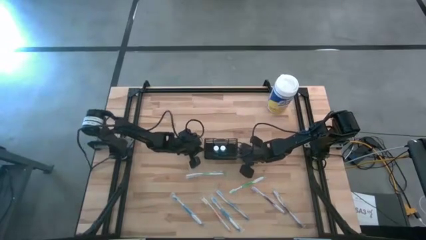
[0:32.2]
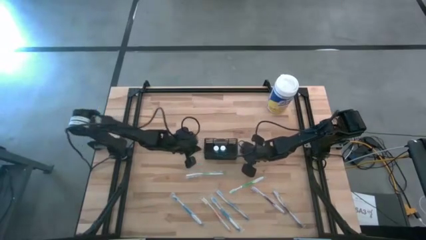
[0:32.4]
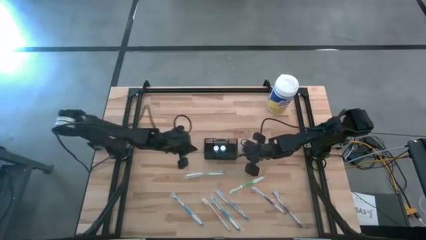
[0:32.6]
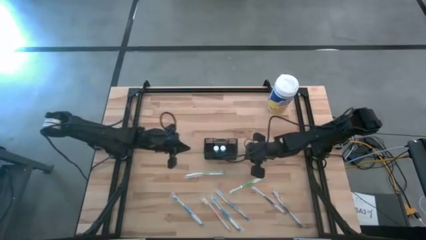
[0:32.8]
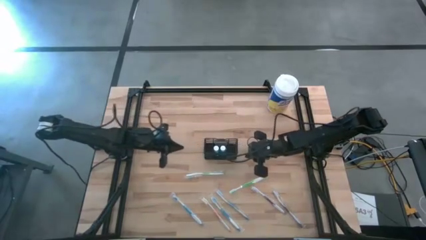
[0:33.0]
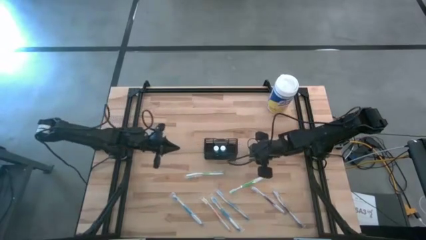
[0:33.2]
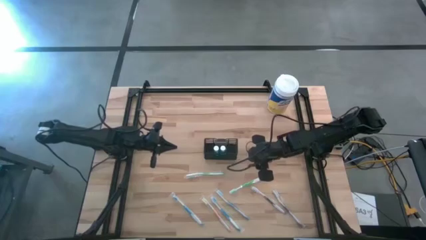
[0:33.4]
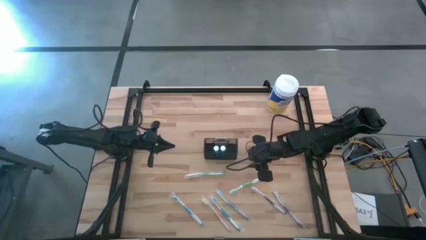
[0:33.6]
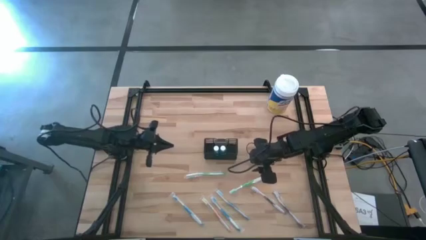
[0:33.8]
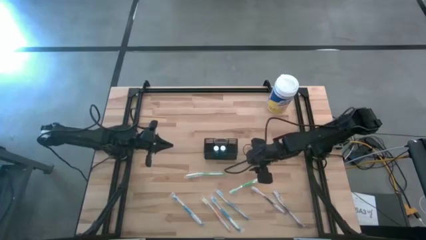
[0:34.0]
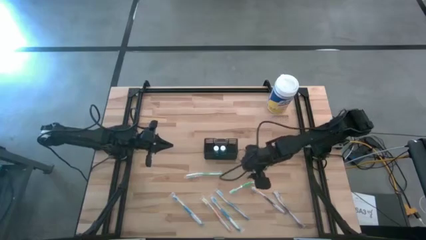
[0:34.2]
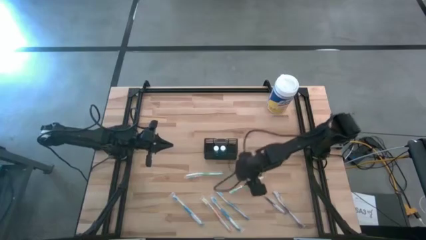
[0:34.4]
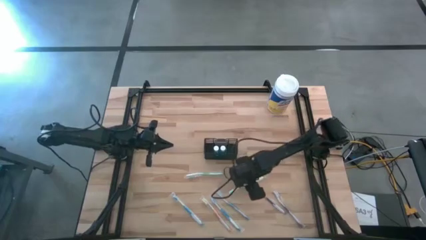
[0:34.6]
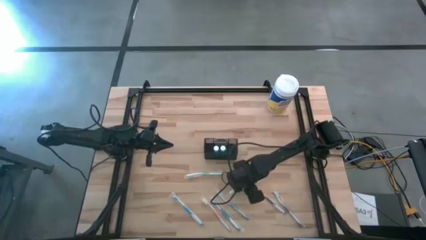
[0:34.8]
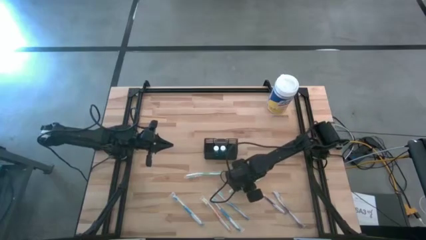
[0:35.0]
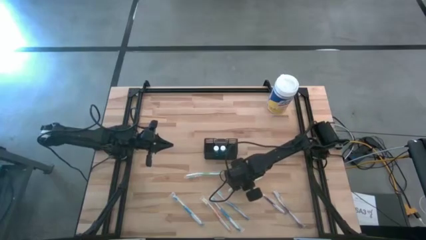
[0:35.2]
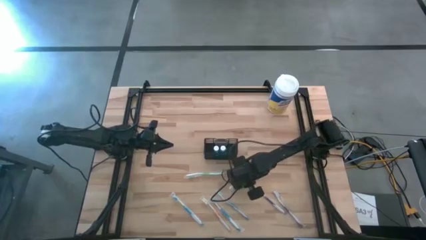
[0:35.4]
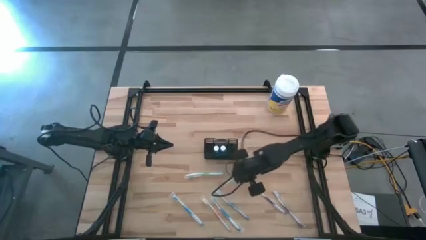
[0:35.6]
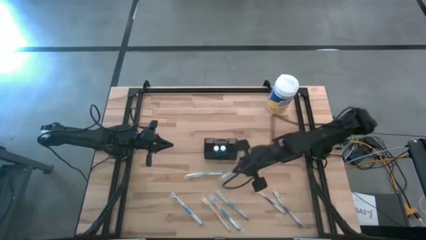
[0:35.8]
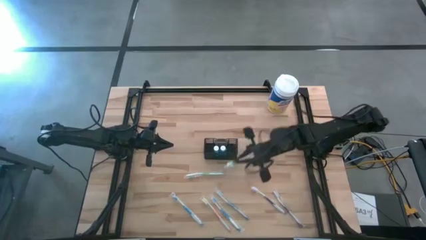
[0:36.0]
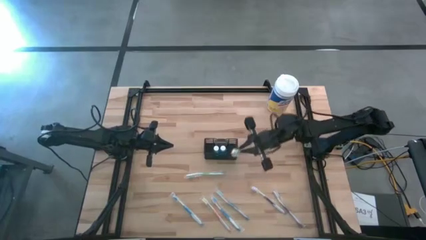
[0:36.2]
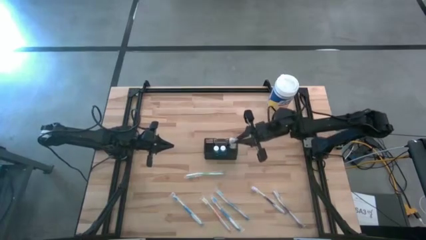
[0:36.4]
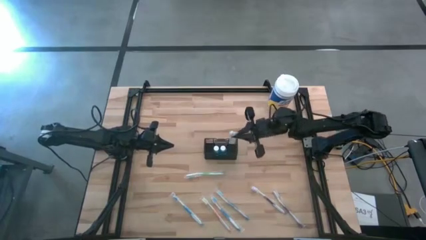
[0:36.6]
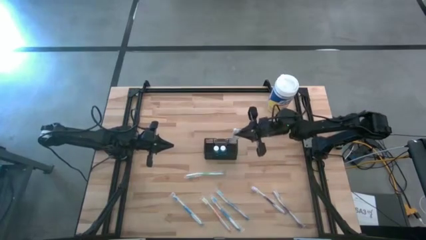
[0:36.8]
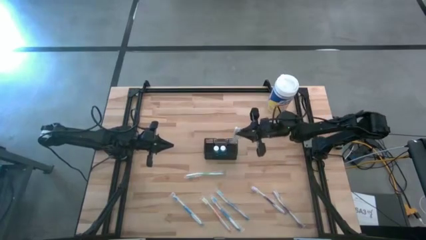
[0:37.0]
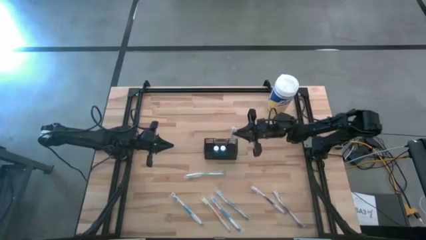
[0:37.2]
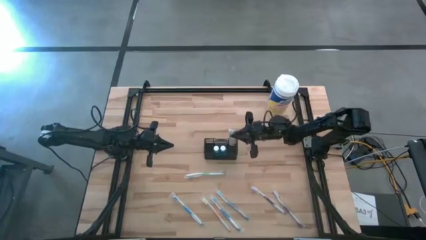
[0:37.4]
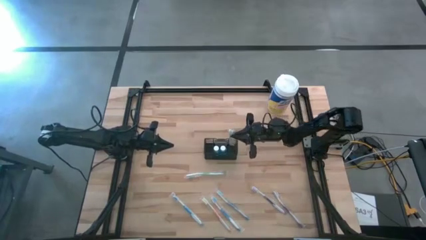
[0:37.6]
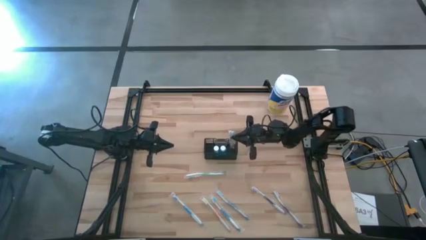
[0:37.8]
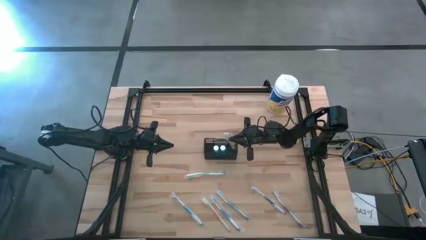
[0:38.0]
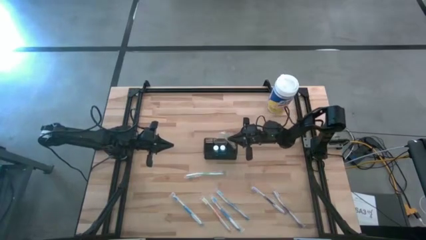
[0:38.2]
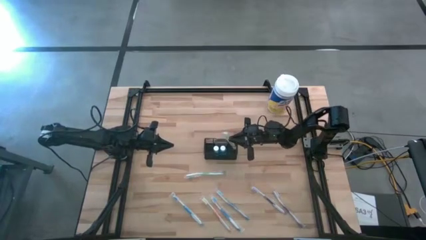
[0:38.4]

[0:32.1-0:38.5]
Task: Pick & Place toothbrushing station
Put the green toothbrush into the black organizer

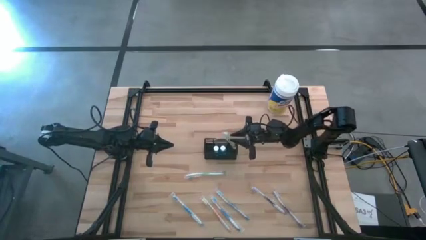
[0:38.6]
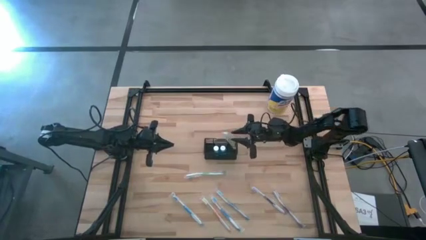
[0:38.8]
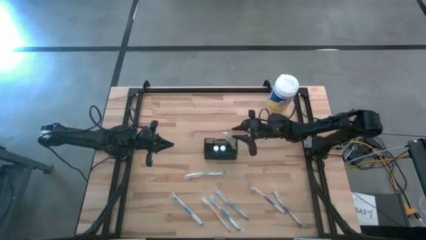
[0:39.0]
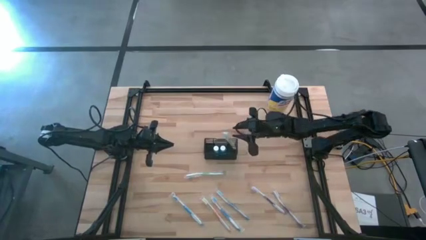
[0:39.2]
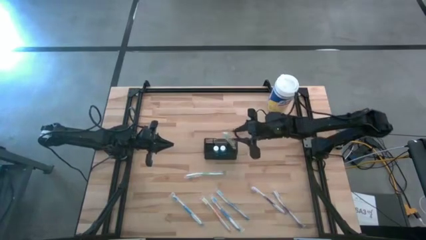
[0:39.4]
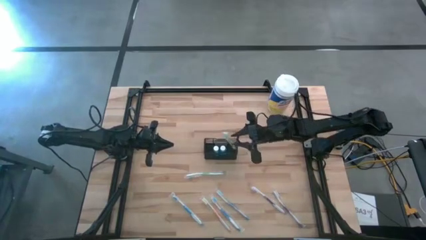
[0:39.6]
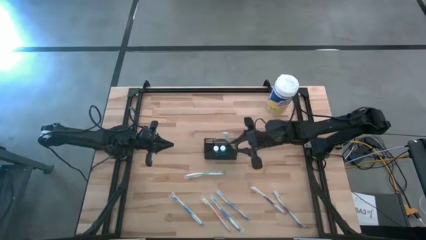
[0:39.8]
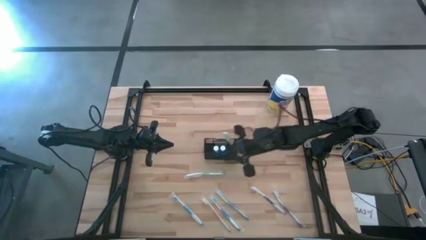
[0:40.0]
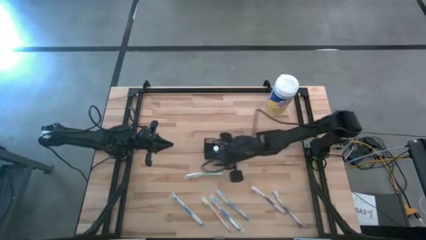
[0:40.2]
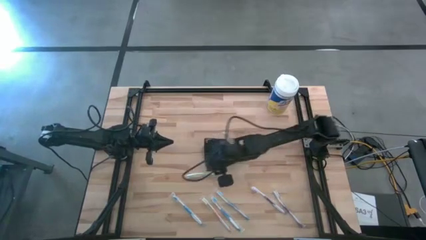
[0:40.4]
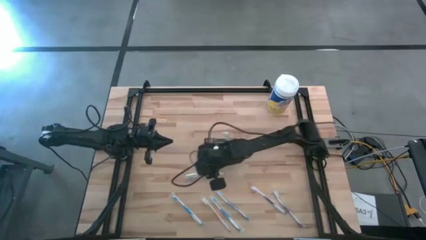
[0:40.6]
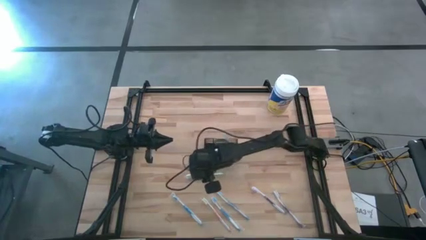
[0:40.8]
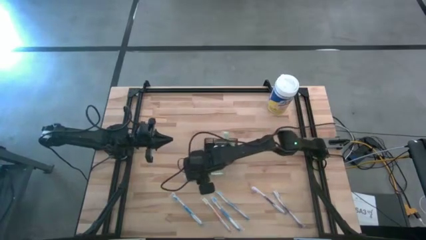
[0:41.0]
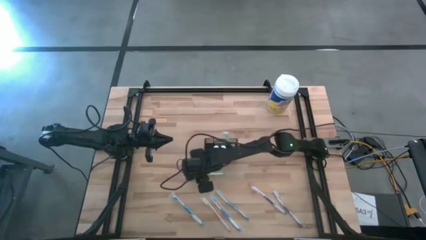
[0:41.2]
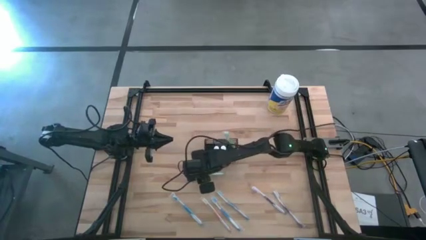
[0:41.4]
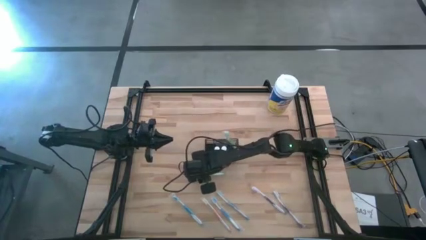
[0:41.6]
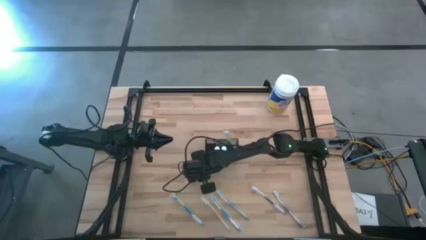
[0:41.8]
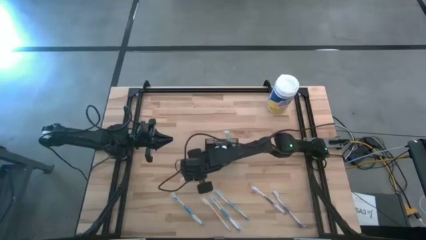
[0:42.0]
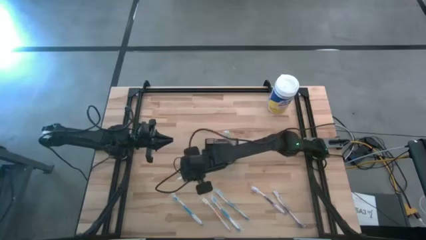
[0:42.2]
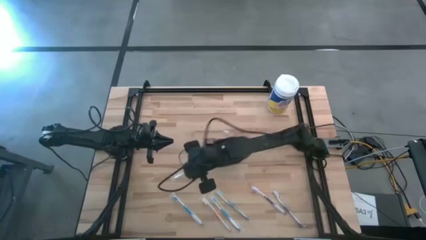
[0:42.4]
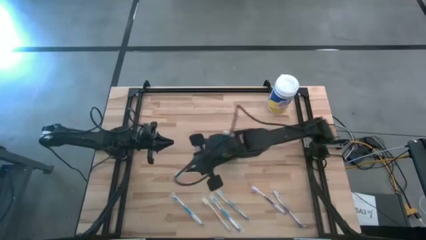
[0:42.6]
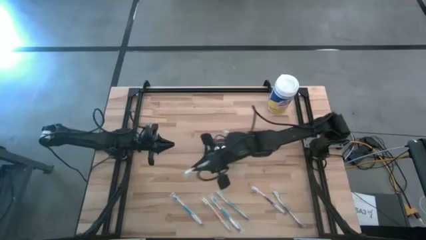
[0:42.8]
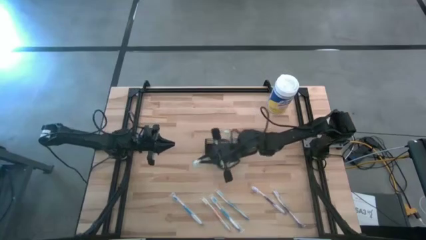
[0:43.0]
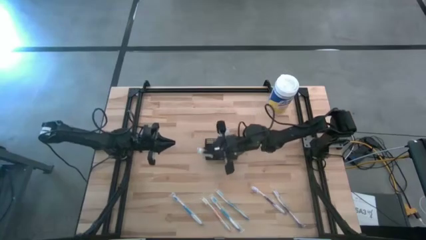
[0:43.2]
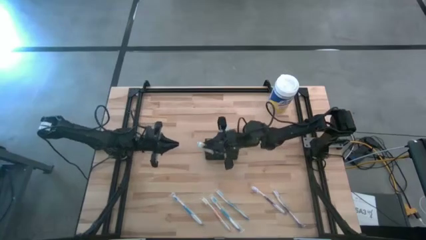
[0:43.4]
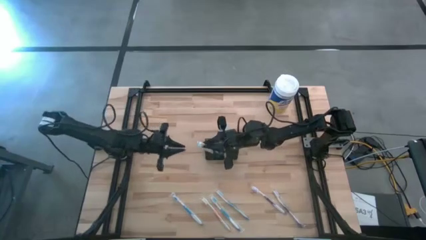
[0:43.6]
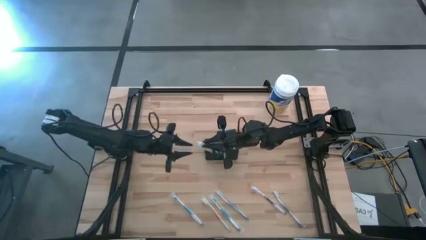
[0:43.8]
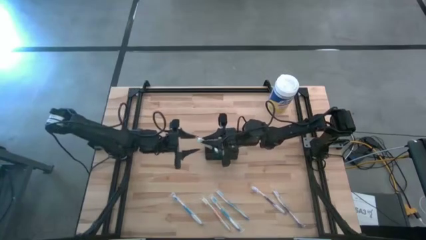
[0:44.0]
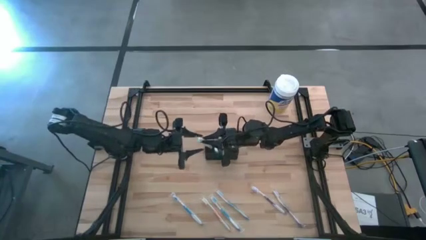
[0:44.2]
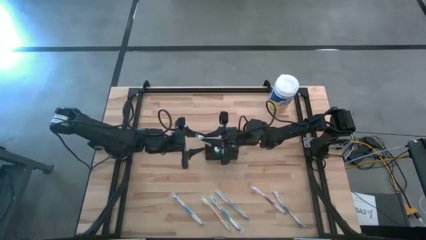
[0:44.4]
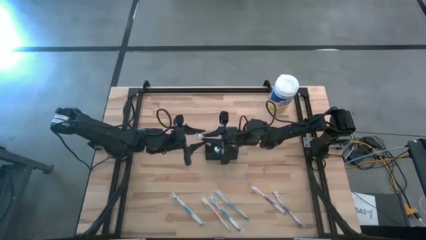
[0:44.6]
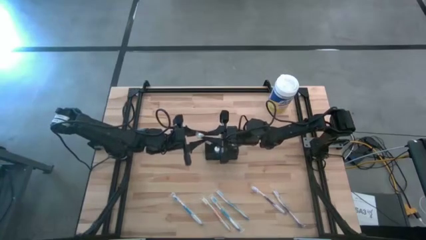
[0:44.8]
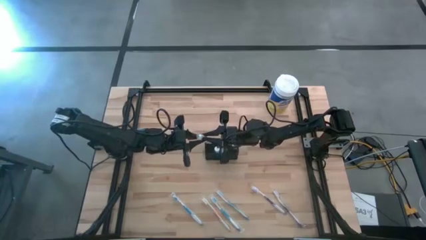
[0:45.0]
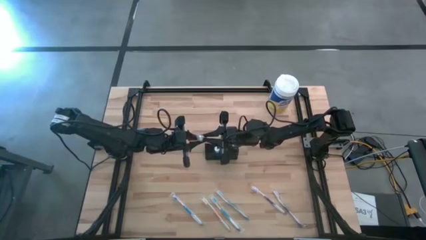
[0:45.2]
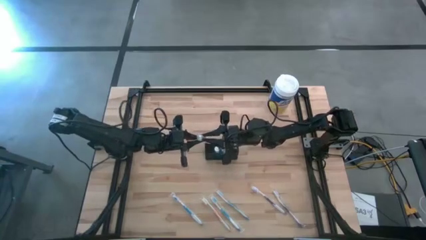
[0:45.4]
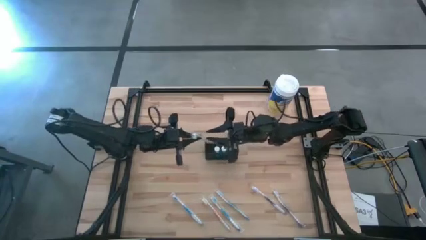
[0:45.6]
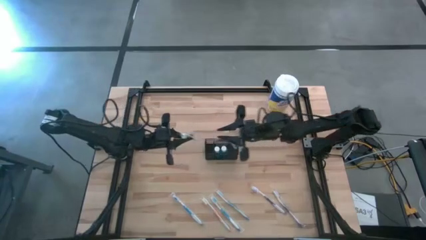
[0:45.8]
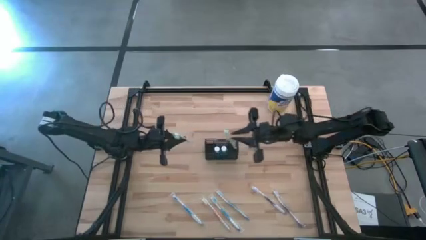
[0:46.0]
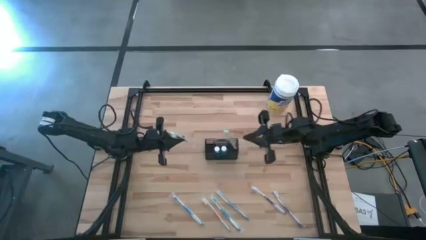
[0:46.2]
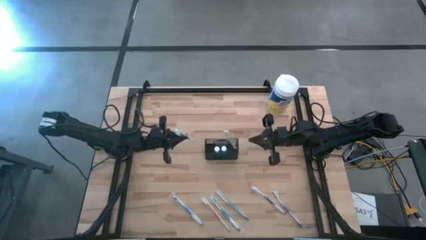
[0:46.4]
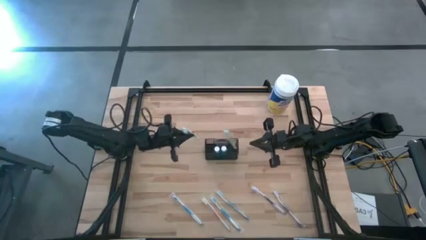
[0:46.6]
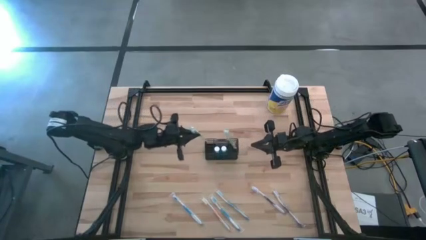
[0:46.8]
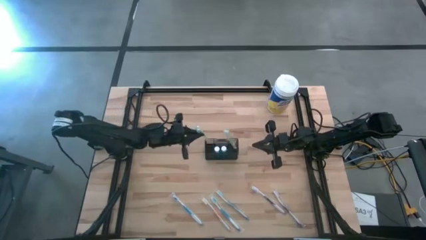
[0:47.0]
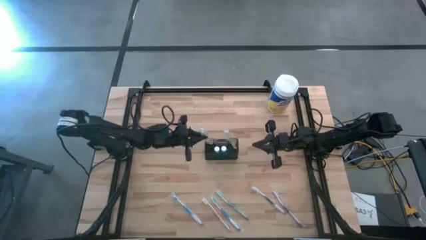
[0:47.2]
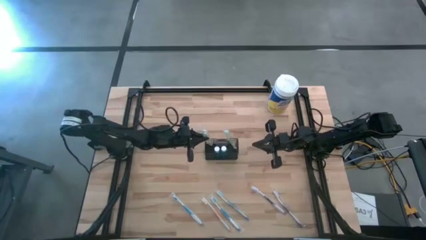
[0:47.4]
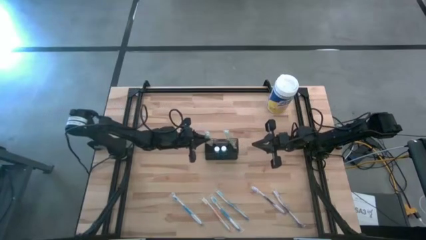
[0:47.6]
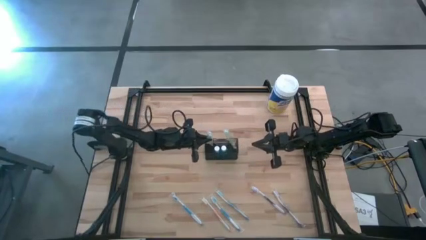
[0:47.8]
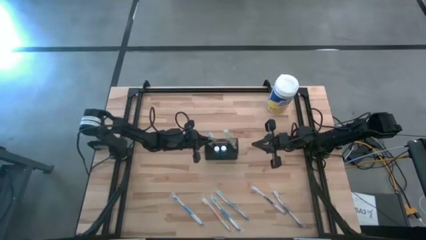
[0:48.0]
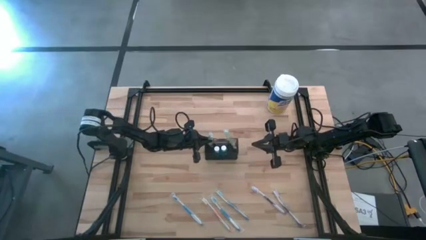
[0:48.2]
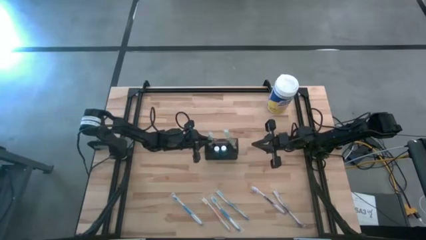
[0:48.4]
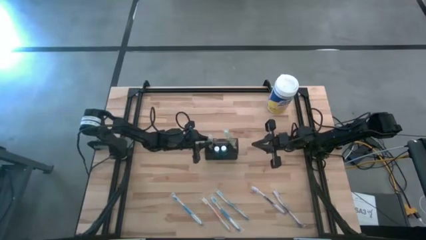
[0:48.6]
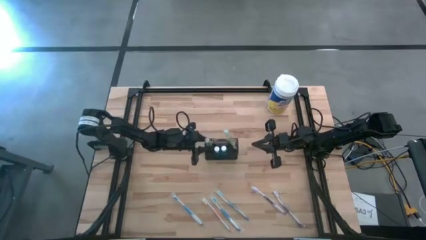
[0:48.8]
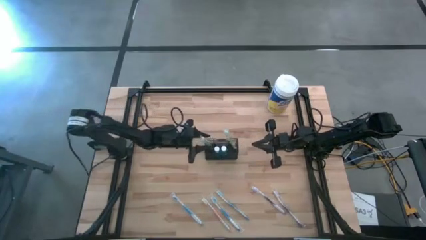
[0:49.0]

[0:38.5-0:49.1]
Put the green toothbrush into the black organizer
